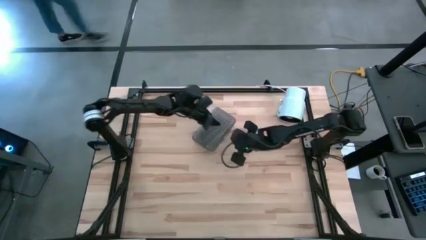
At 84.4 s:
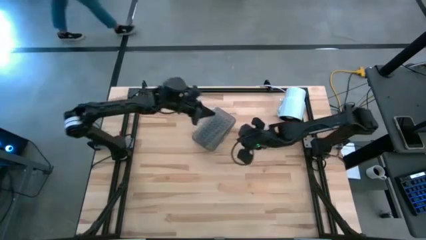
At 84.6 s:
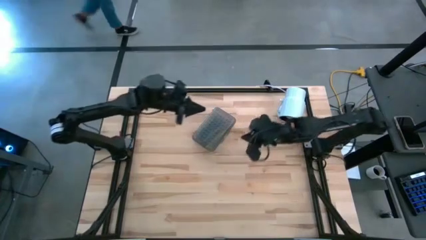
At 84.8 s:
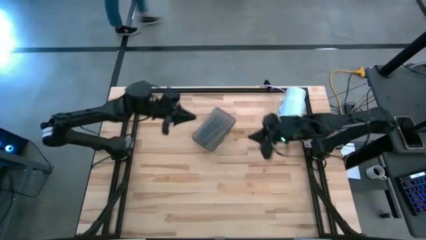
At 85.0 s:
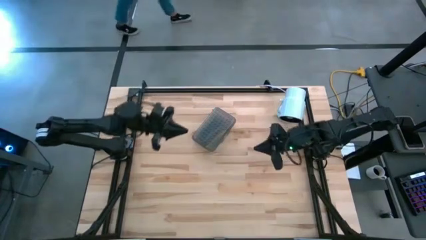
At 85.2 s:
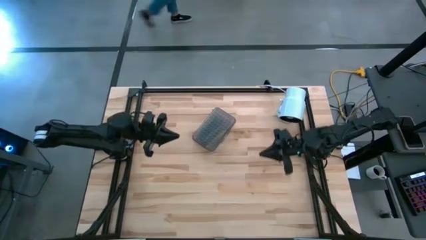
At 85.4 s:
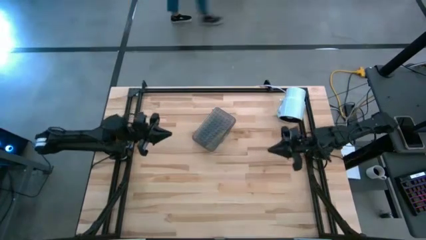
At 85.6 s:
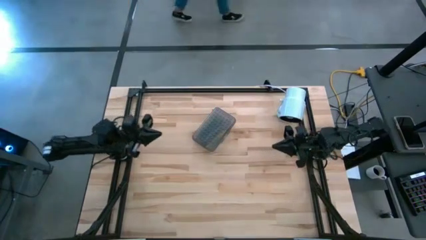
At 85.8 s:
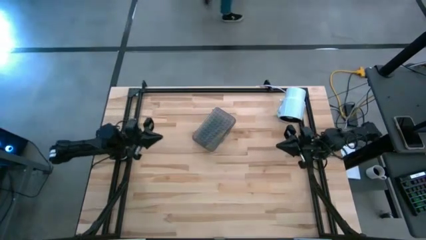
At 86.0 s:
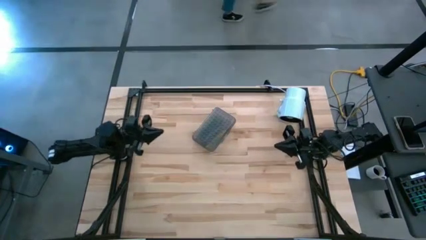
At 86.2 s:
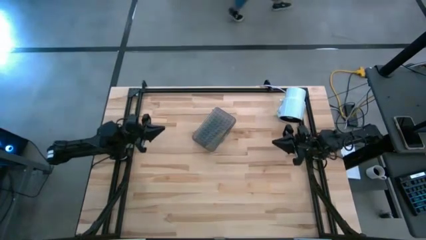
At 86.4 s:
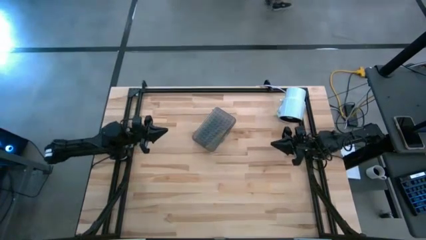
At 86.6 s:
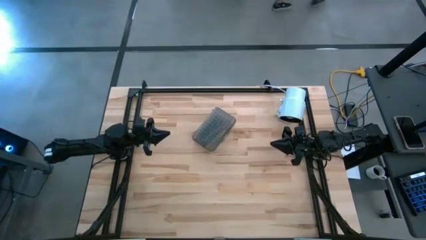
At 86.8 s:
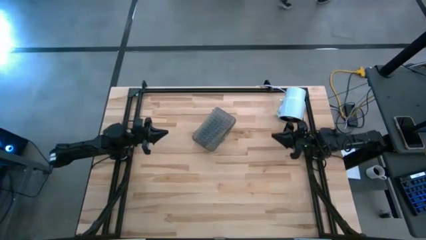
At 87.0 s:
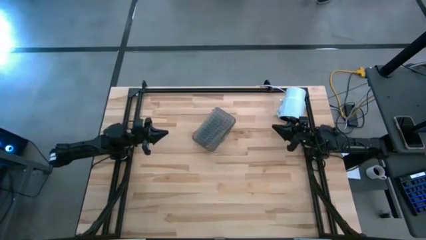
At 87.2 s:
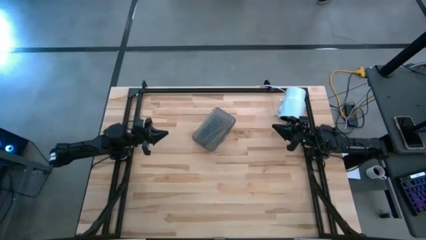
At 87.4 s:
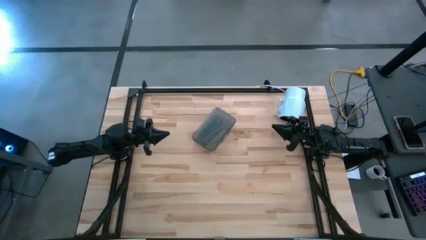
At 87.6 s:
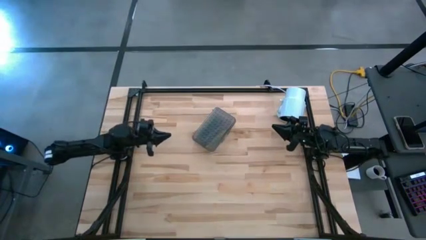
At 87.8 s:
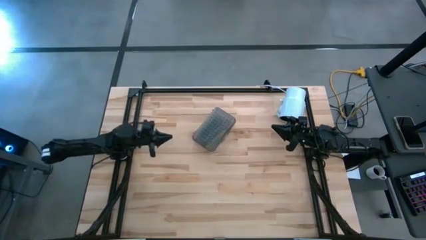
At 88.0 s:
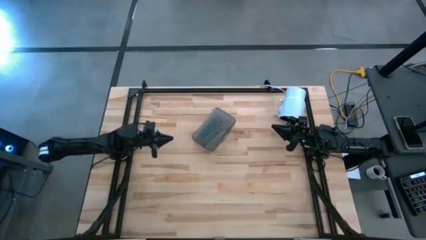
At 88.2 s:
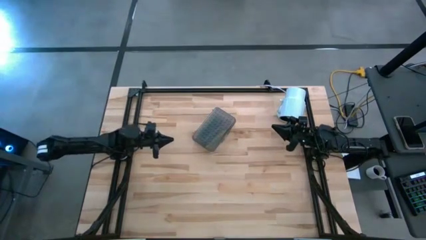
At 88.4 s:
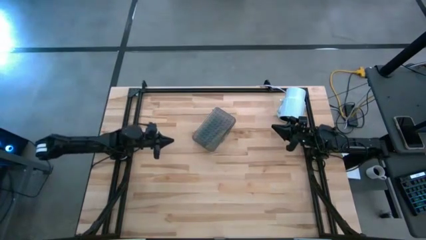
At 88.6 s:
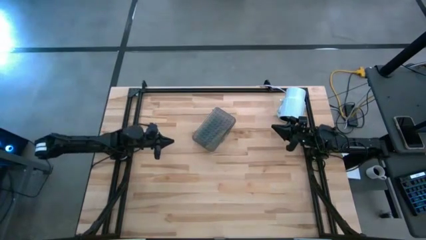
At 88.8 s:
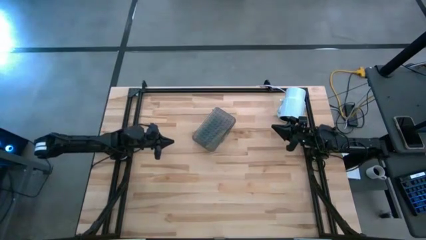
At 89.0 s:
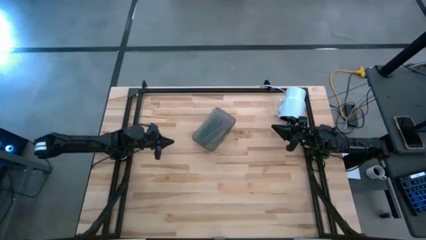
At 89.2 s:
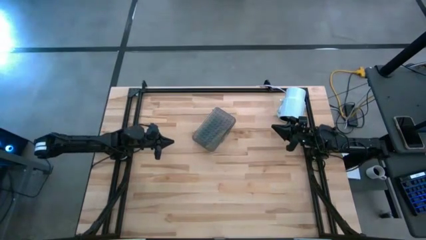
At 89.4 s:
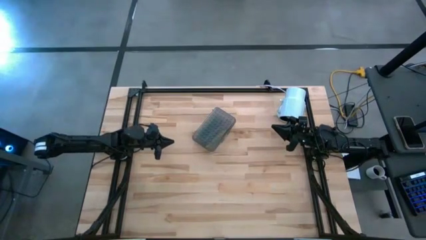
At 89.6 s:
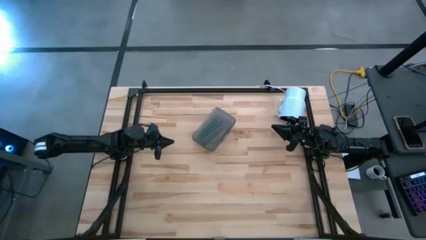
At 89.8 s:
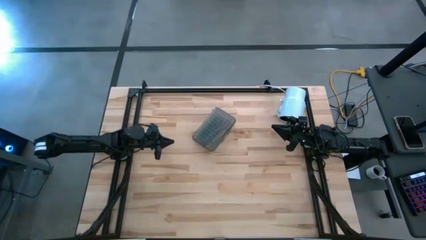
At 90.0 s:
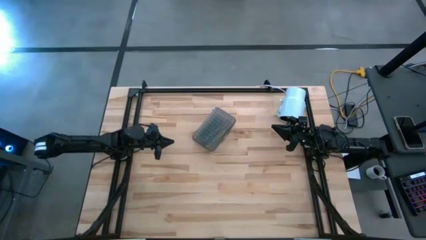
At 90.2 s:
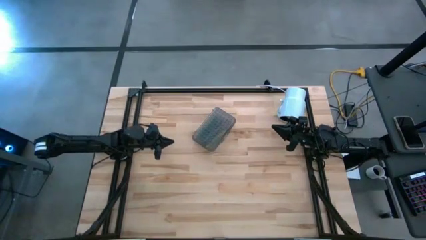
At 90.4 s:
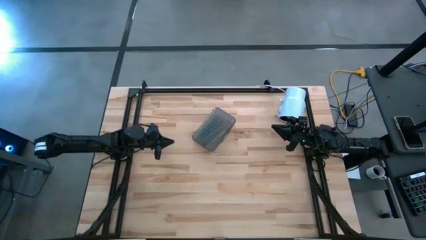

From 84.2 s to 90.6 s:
Task: Pick & place school supplies into a supply box
Return to Home Position

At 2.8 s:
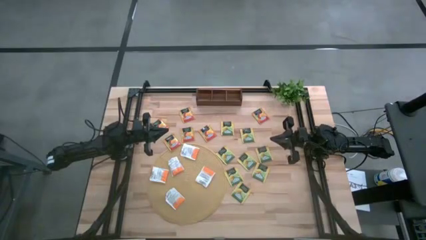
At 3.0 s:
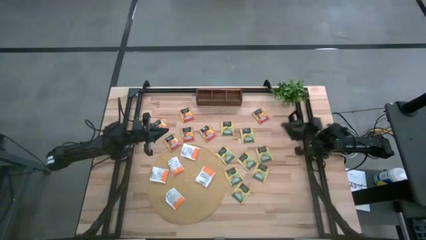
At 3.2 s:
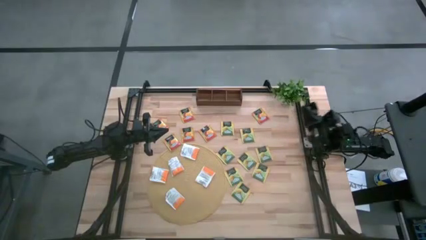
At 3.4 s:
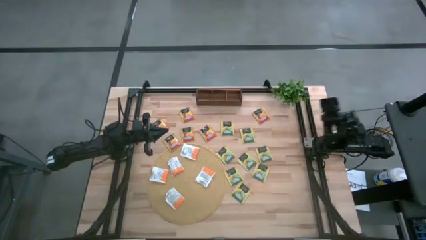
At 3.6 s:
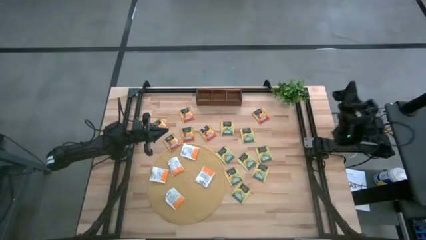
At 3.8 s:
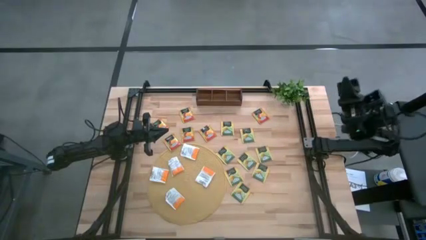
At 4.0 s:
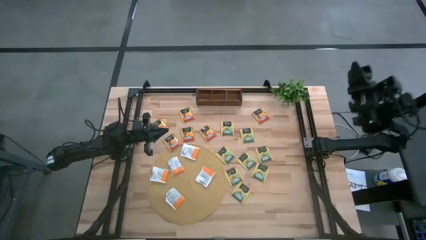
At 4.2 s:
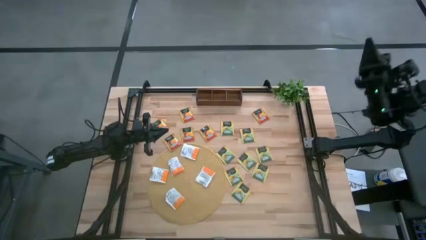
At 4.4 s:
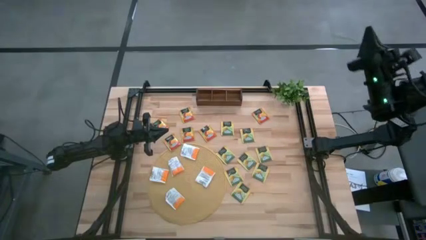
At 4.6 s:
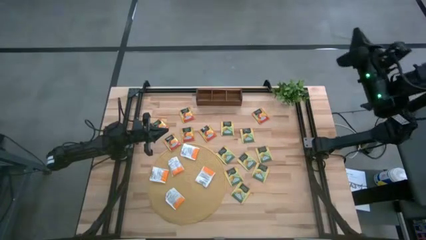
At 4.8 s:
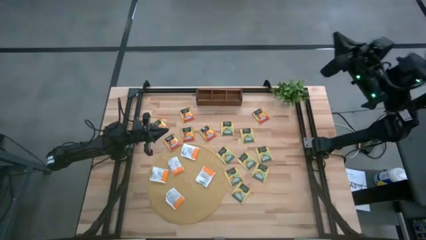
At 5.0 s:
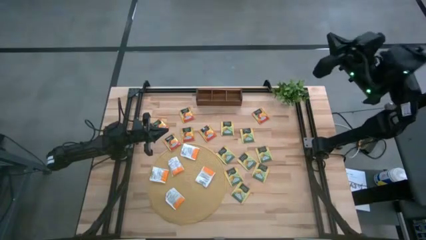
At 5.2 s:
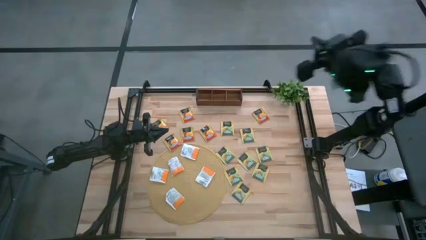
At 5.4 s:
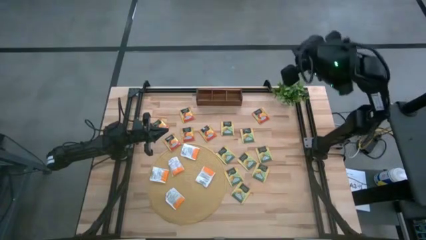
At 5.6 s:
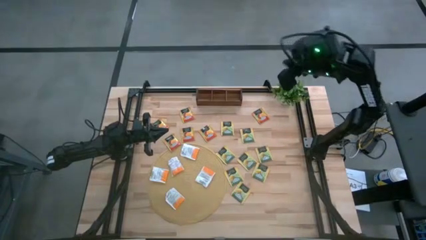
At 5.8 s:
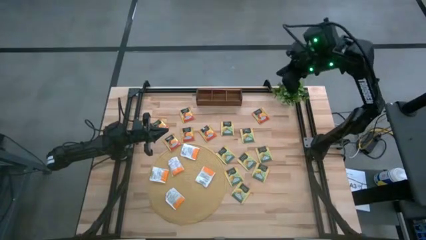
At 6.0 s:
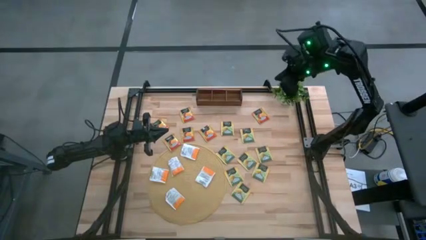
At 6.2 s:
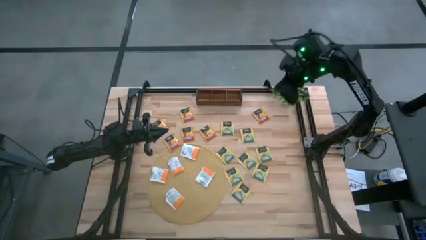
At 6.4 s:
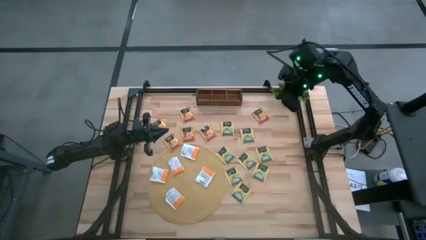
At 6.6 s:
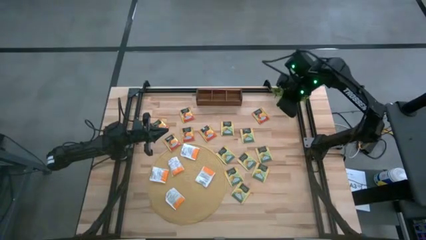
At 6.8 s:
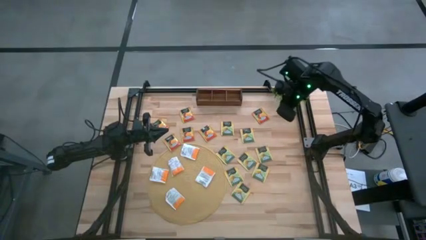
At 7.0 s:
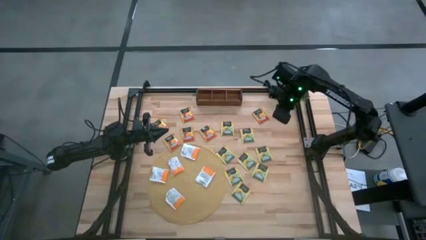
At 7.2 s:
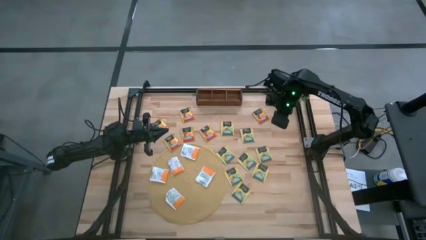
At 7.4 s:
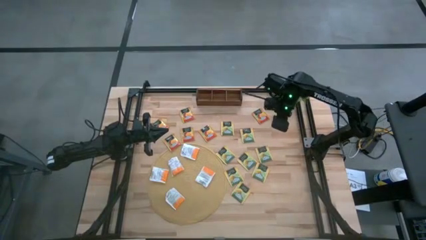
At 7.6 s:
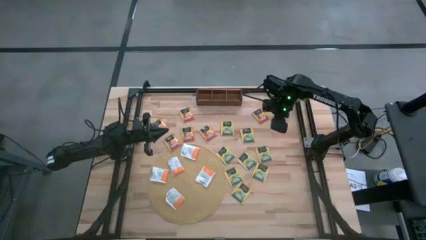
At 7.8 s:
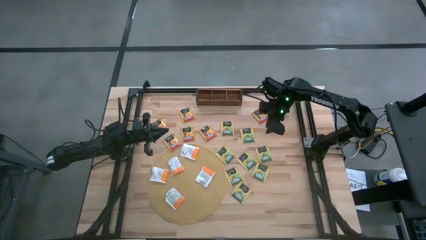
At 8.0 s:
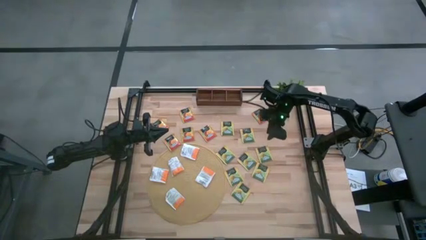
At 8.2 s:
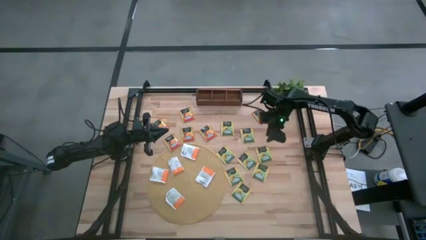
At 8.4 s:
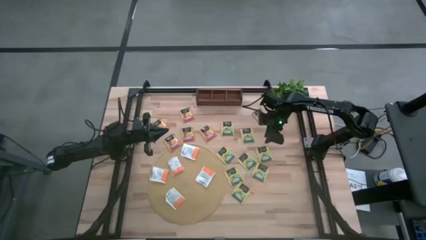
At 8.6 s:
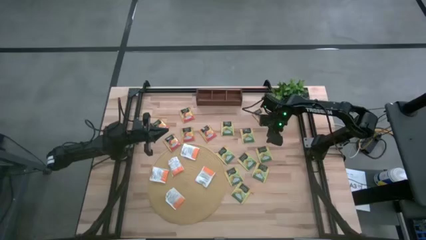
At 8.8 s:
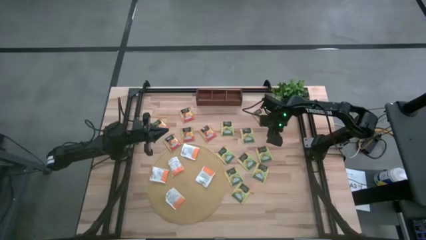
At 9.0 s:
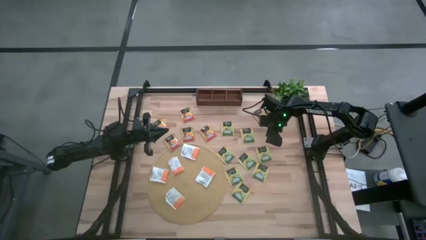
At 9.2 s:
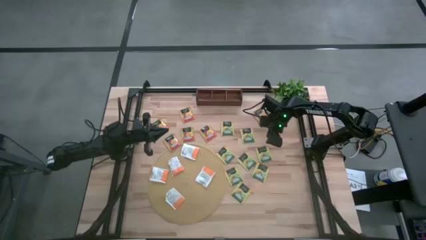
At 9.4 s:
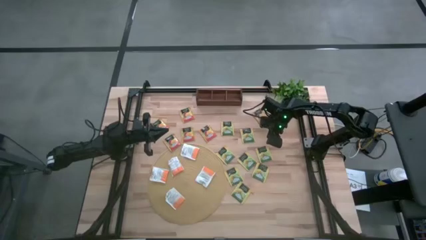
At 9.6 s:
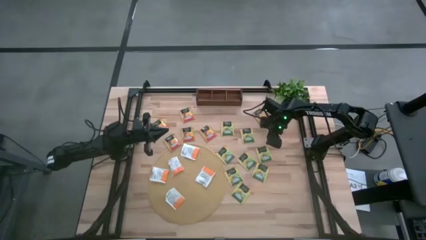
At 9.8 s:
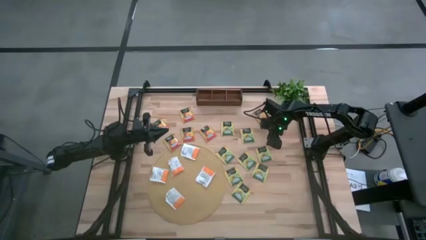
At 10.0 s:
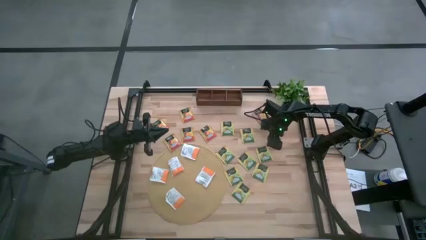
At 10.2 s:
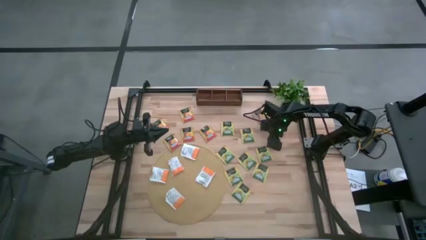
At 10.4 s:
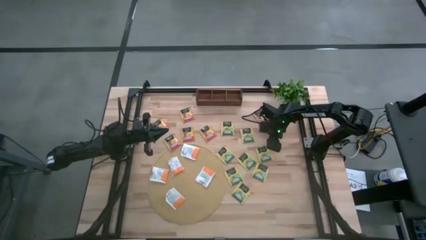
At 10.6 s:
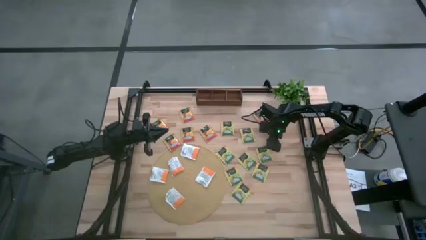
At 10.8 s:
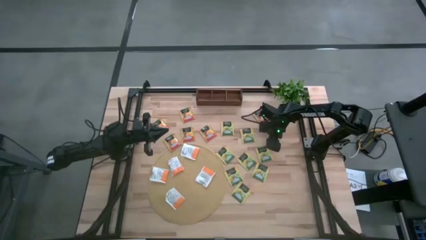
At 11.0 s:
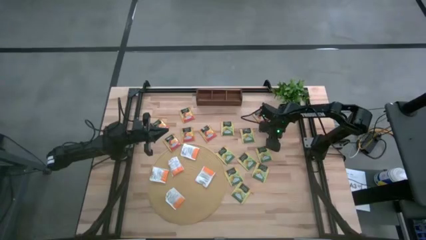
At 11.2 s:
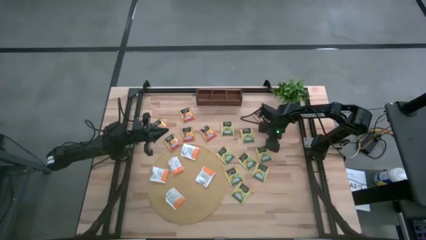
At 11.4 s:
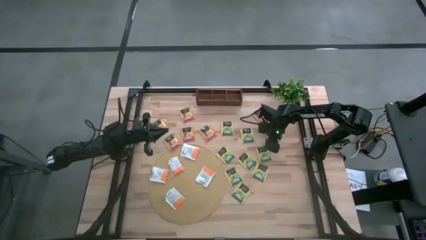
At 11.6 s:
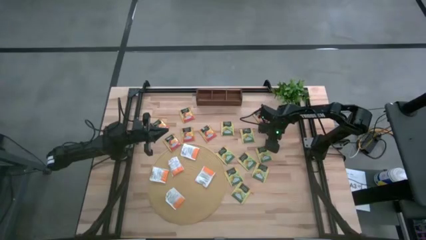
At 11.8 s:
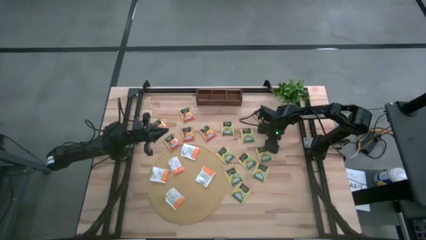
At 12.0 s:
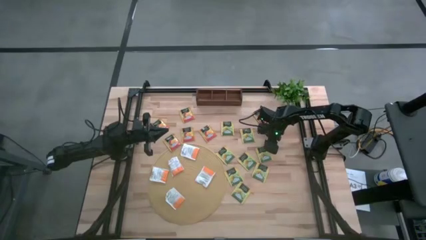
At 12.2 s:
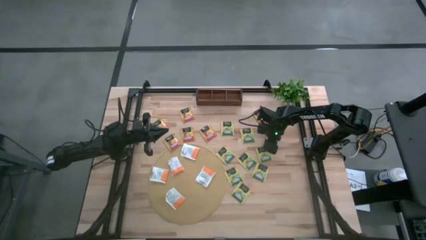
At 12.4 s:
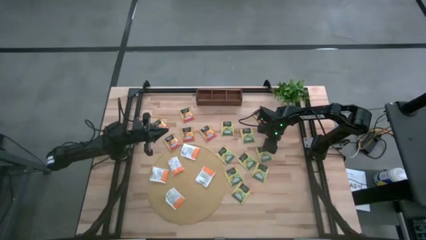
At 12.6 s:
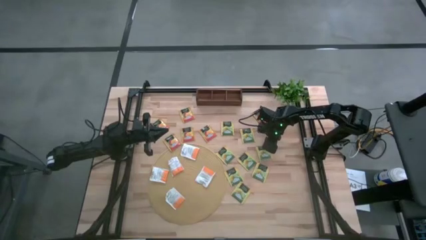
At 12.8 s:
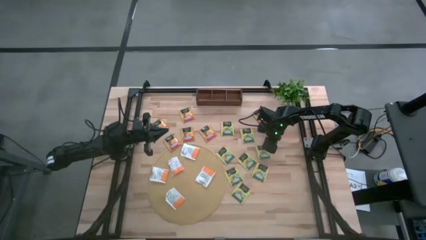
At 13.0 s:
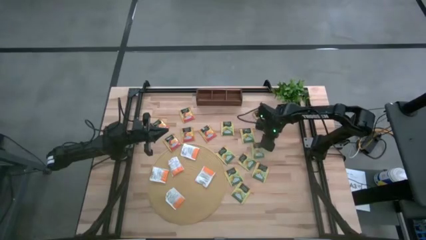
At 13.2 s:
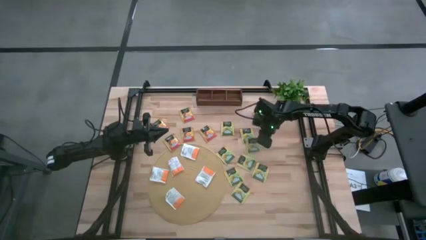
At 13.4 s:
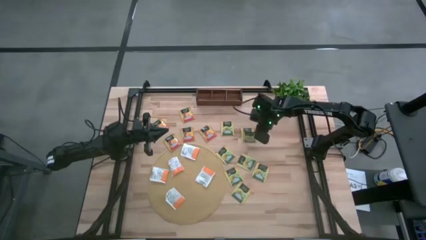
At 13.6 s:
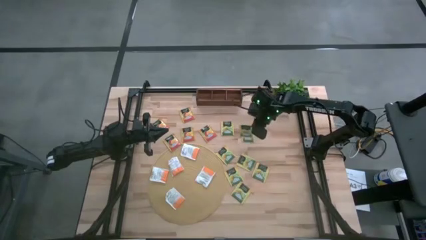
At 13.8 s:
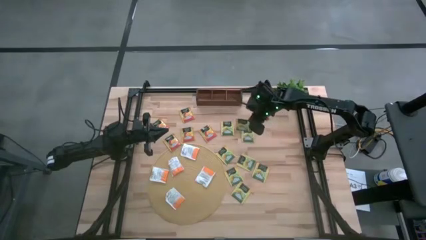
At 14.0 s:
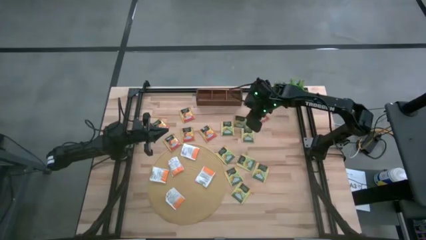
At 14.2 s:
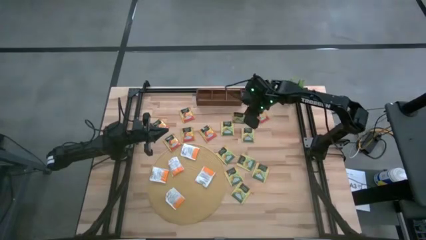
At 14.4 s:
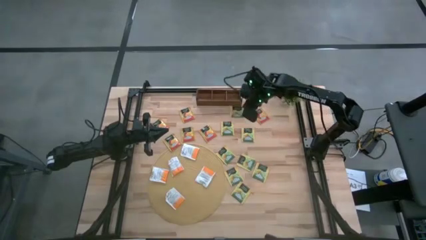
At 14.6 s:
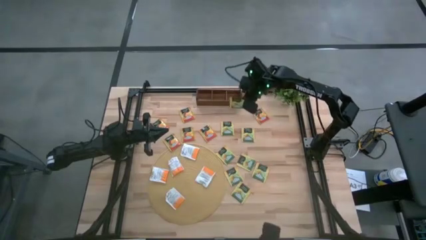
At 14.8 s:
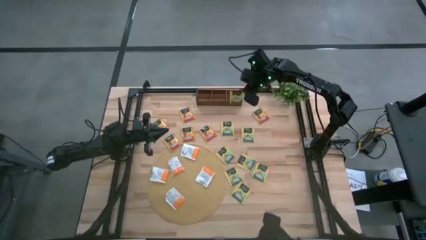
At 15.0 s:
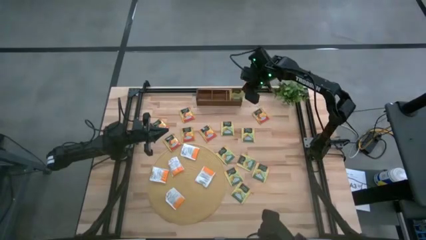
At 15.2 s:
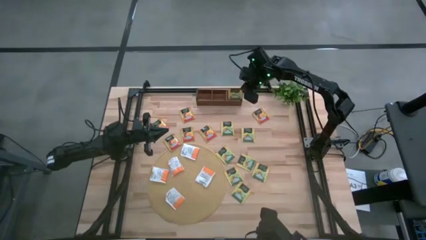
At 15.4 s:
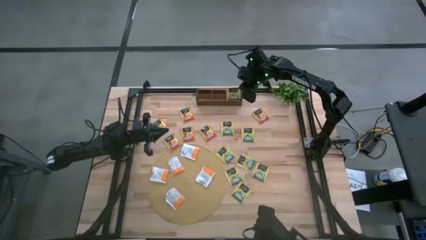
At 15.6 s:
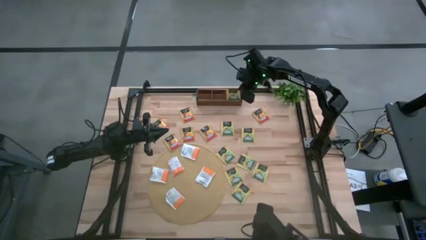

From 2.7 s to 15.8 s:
Task: Pick & Place Tea
Put the green tea bag into the right slot of the wooden organizer
